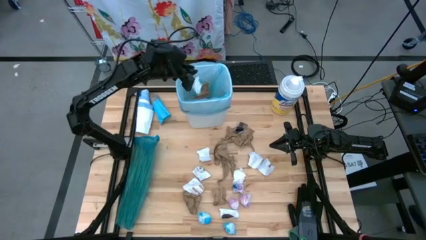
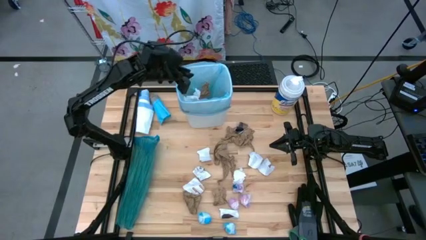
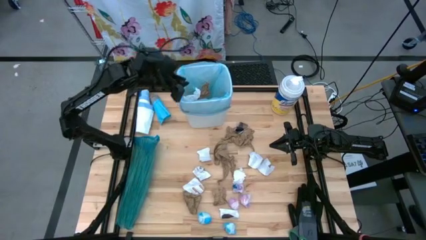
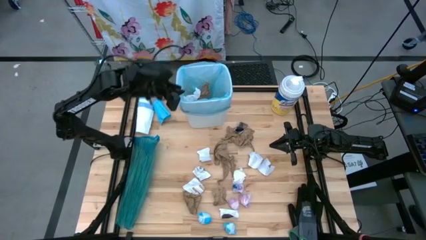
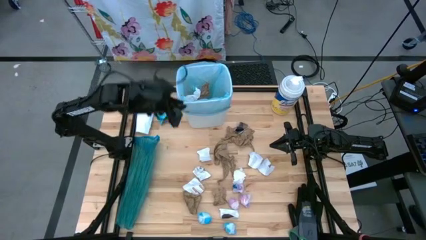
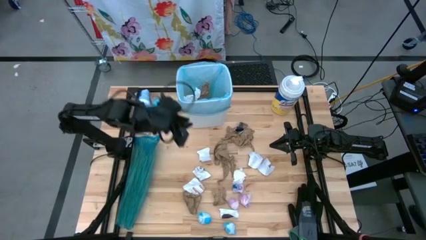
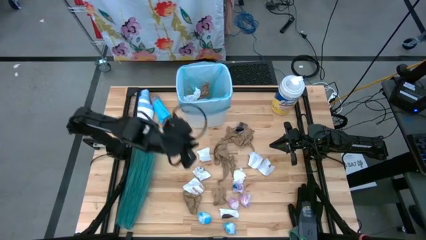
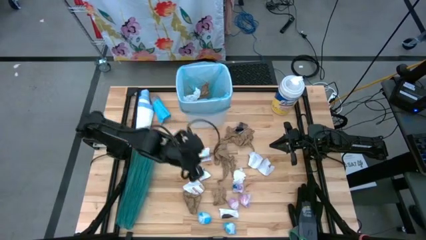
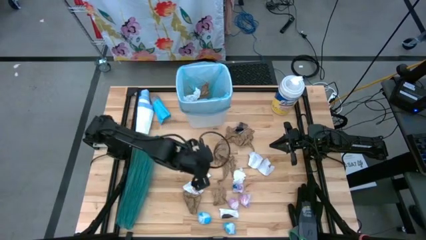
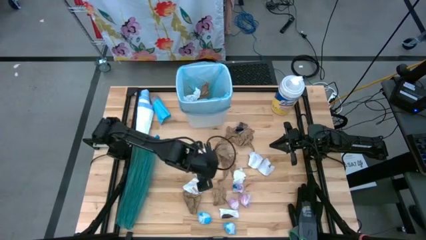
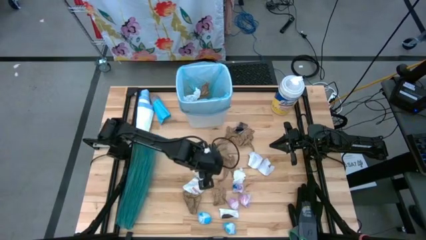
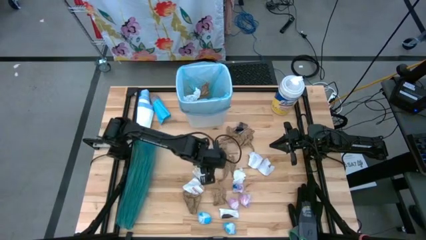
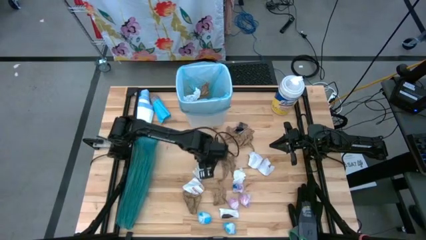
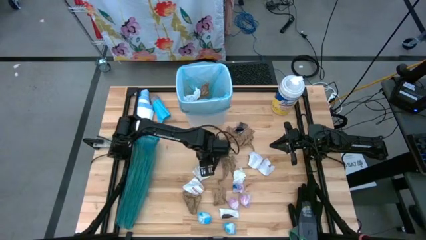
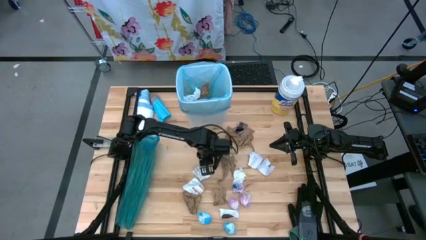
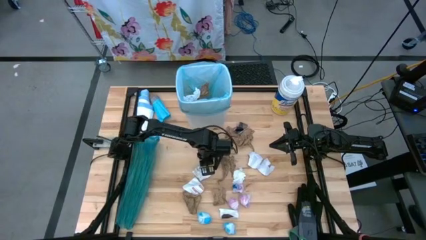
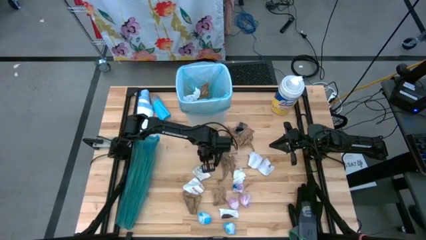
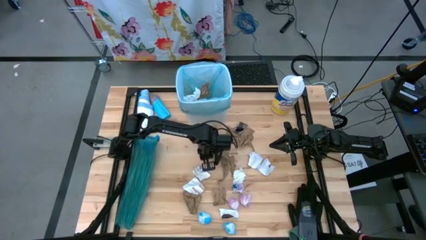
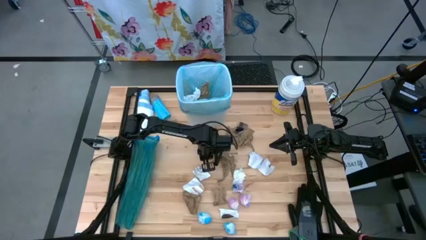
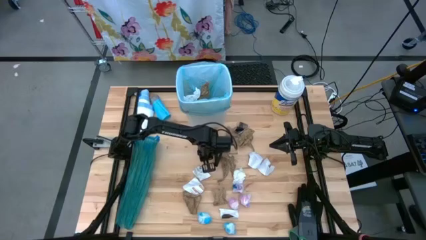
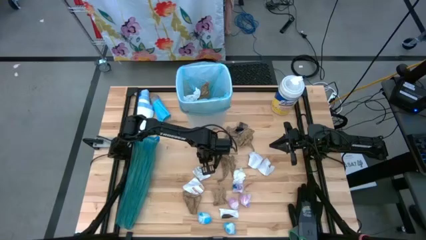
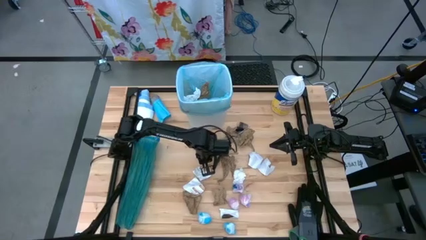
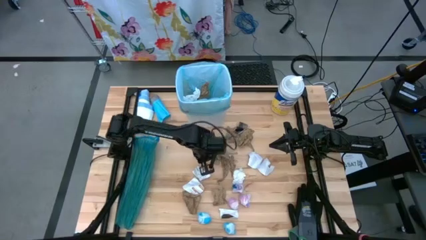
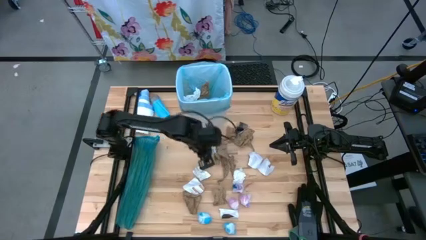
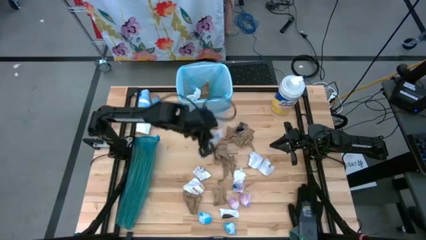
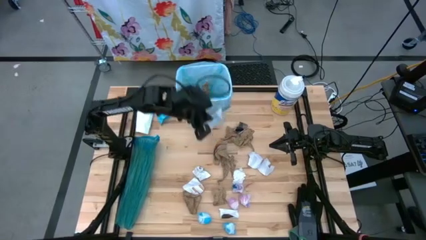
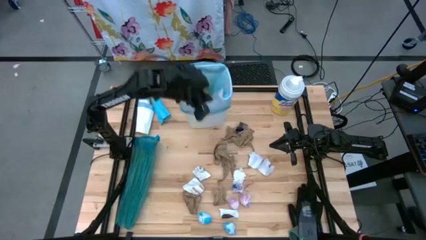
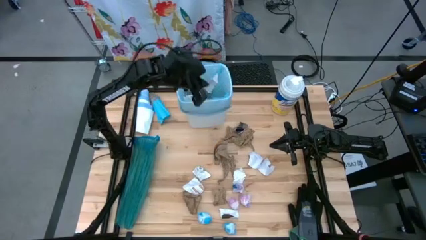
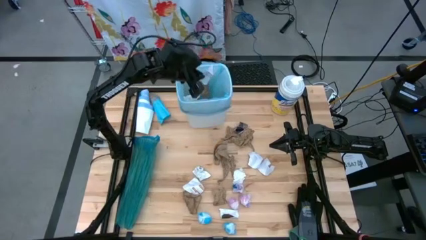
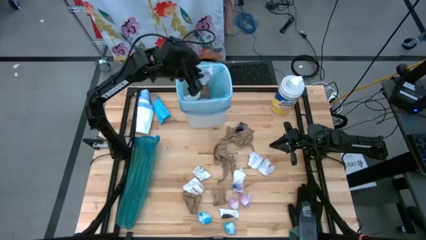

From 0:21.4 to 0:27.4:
Task: place trash/remove bag and relplace
Put the white paper into the white trash bin

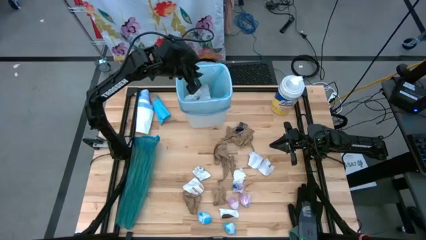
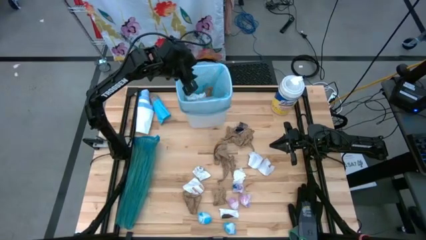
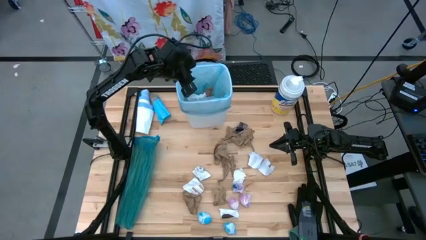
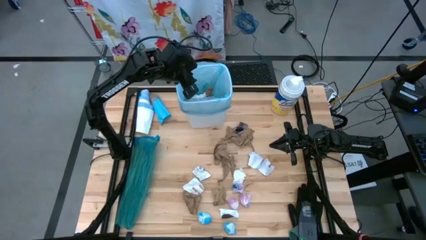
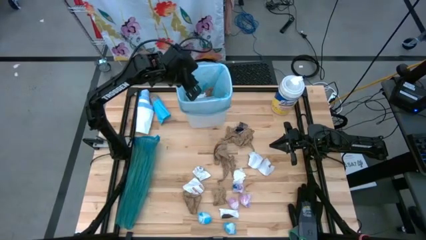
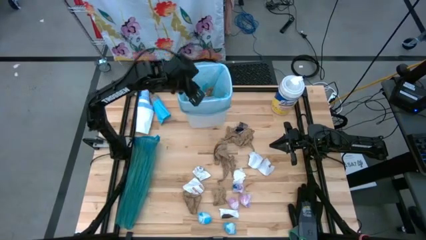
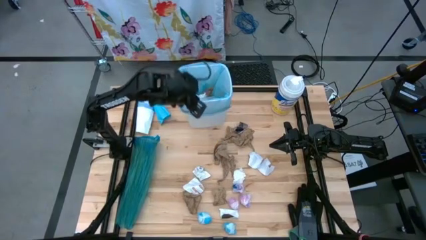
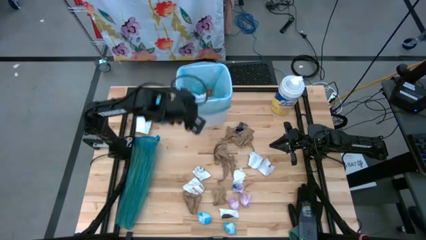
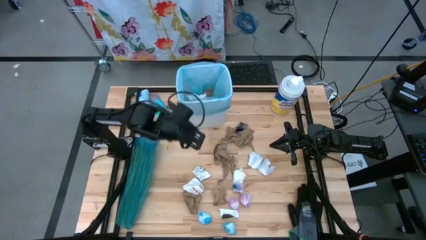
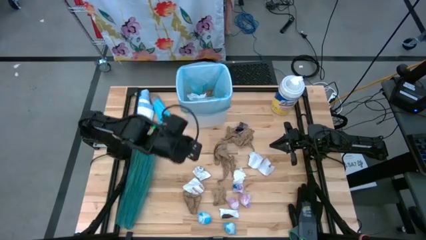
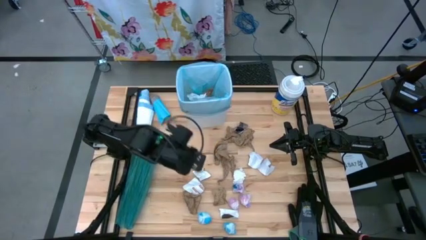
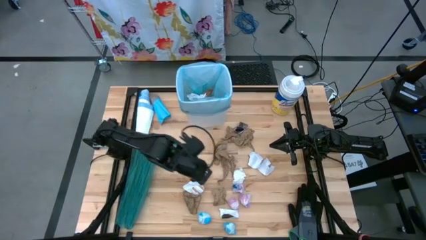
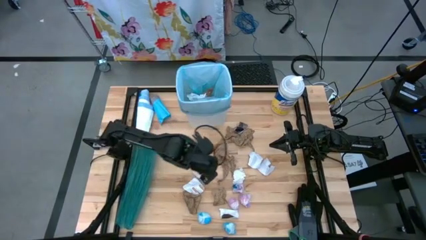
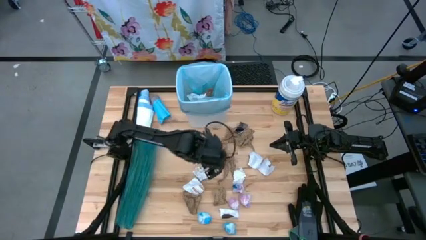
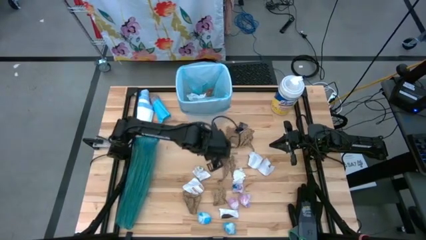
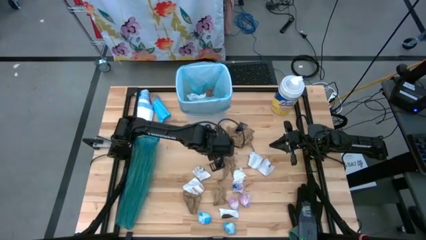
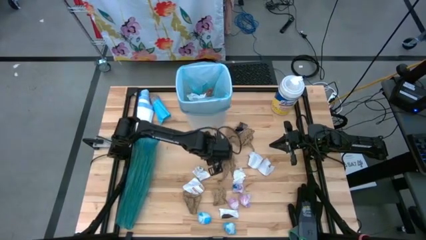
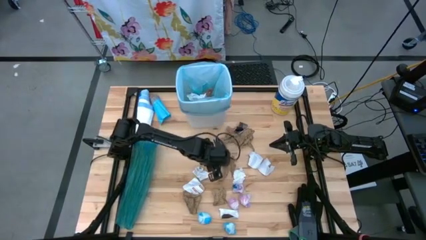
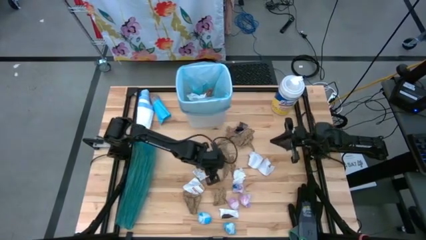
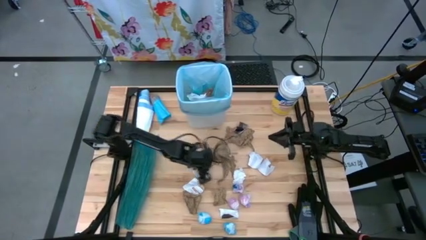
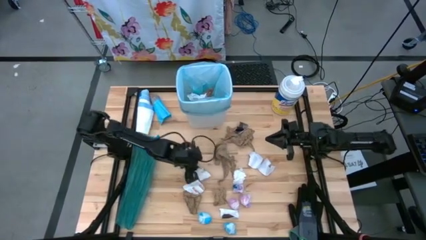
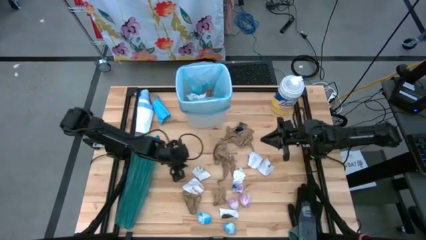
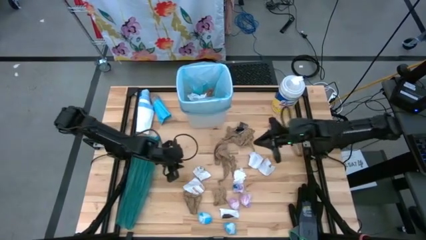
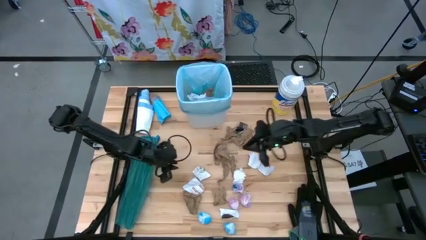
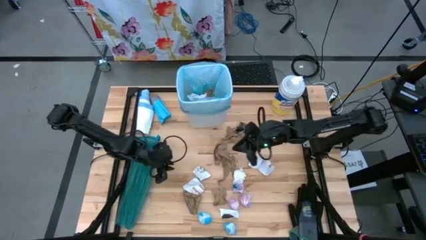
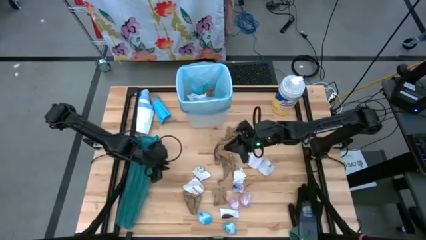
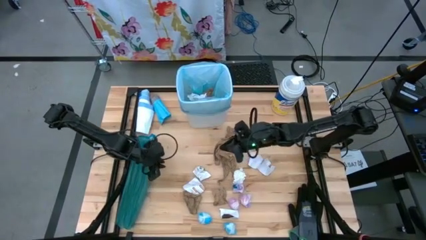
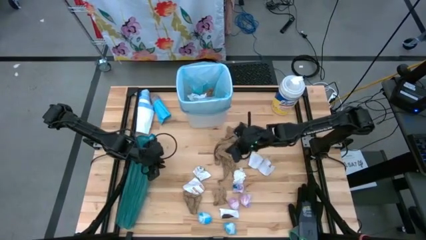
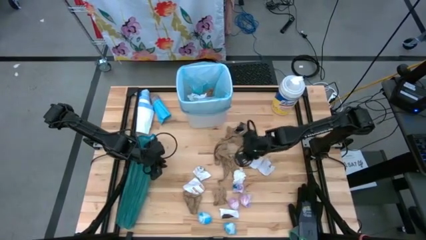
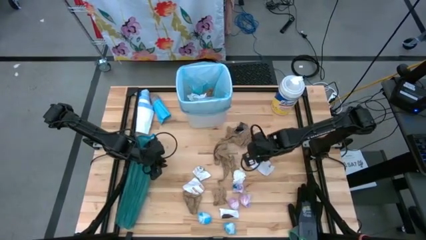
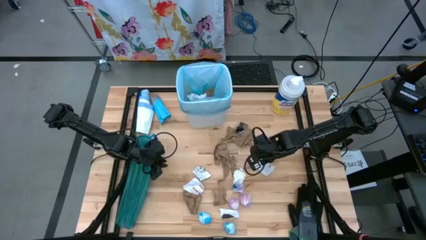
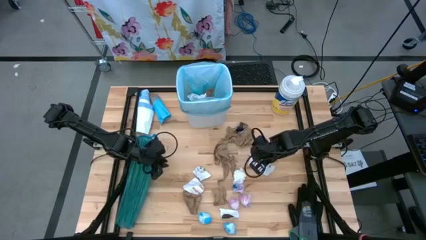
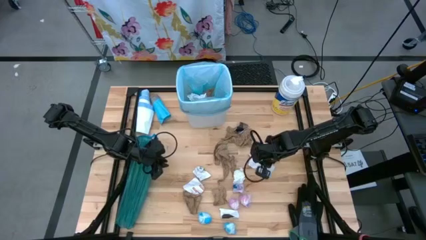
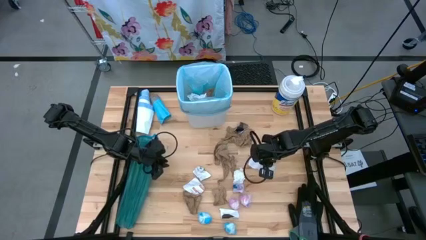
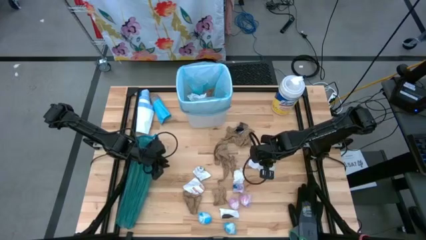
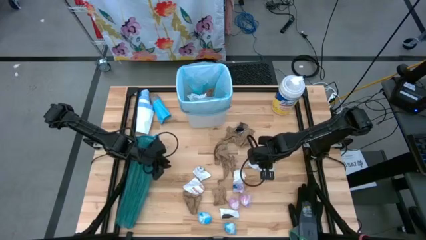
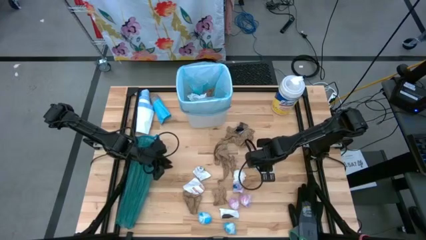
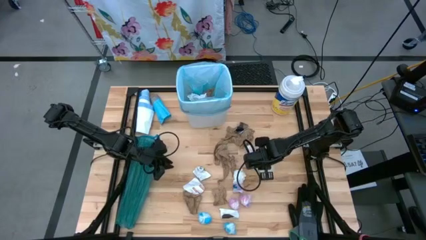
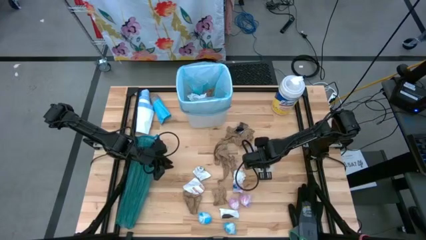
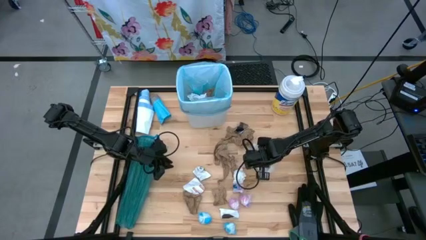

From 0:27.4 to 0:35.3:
Put the white paper into the white trash bin

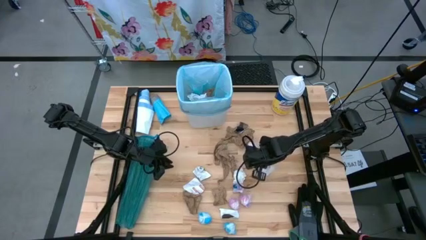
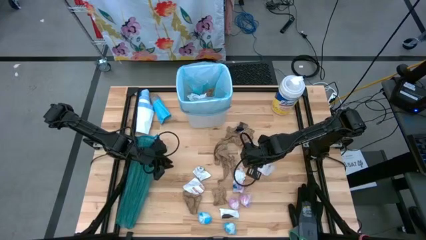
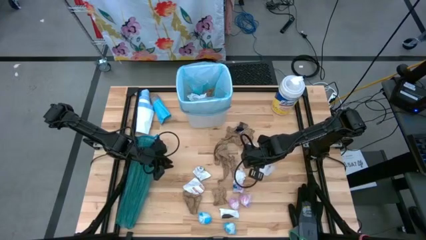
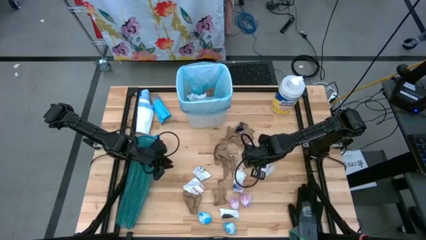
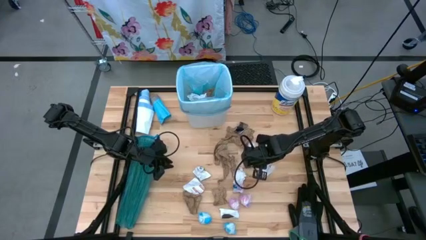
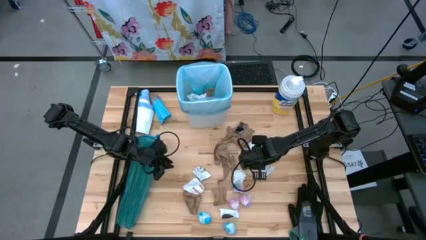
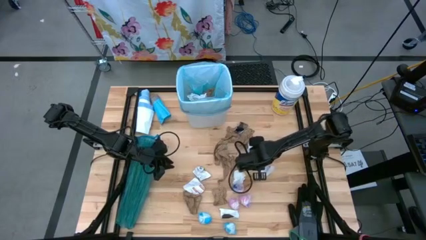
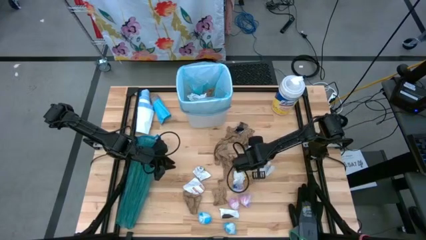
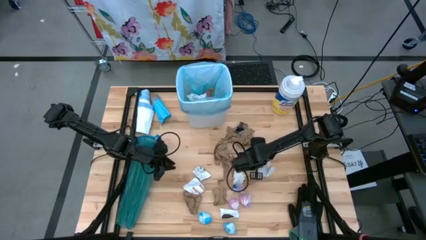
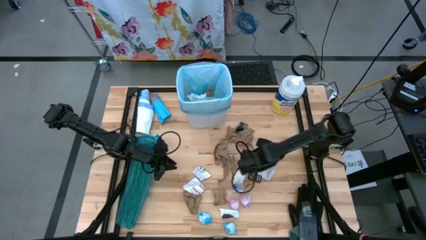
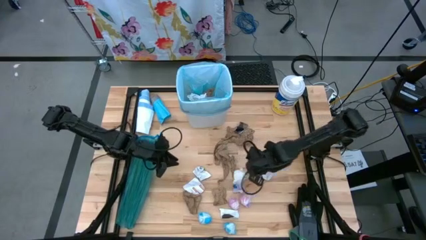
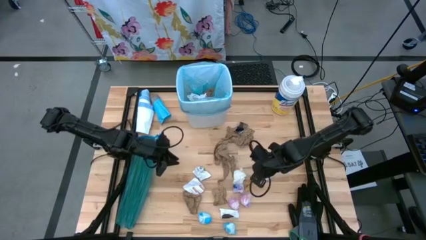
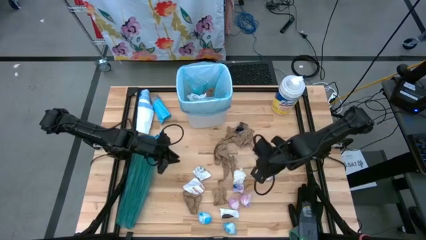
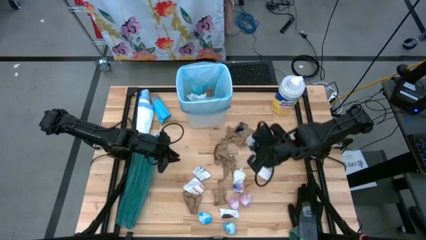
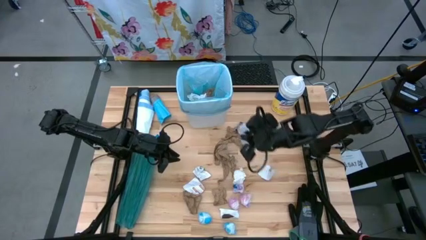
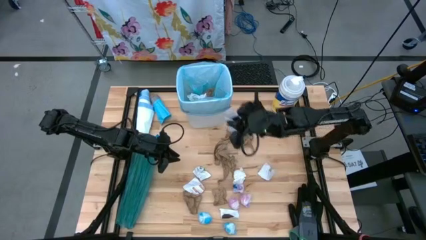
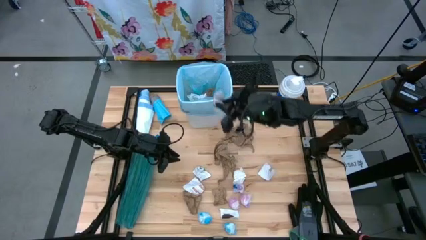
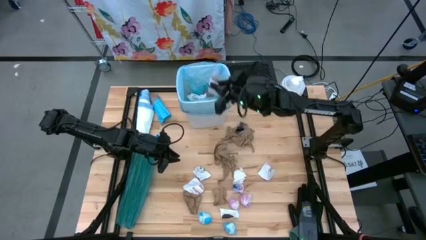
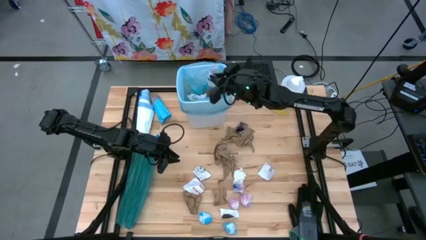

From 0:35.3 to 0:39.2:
Put the white paper into the white trash bin
